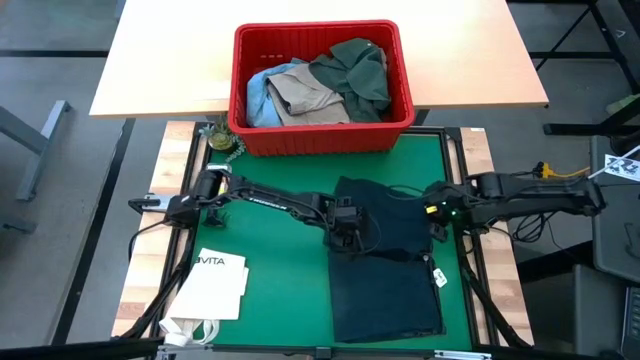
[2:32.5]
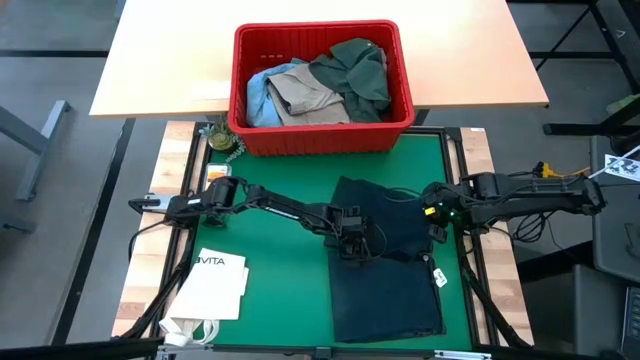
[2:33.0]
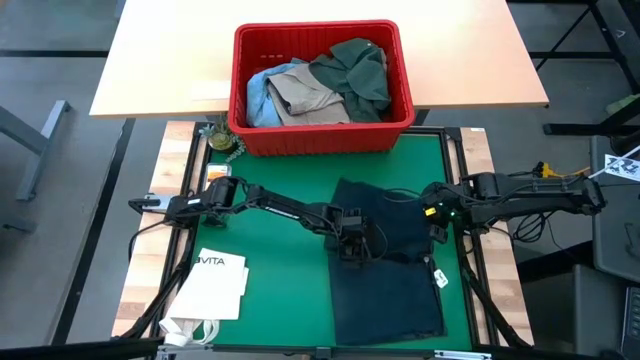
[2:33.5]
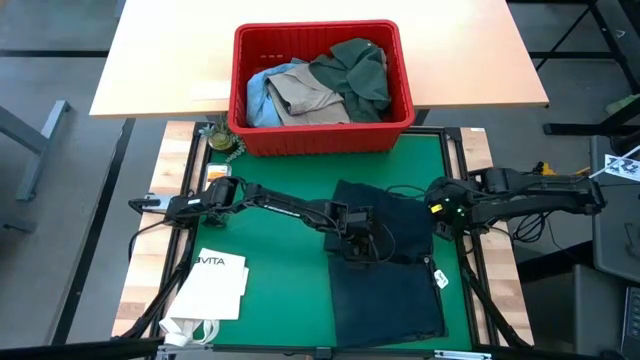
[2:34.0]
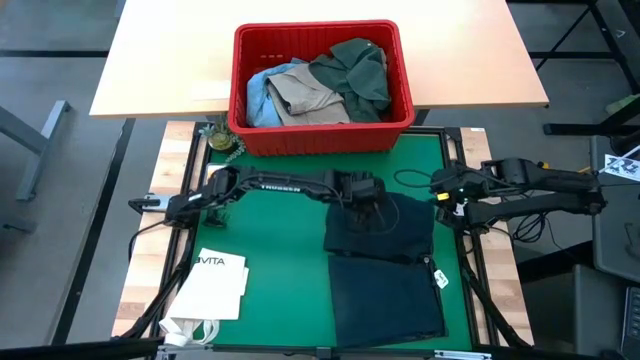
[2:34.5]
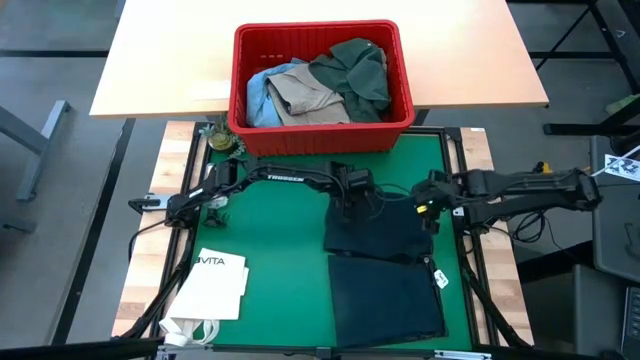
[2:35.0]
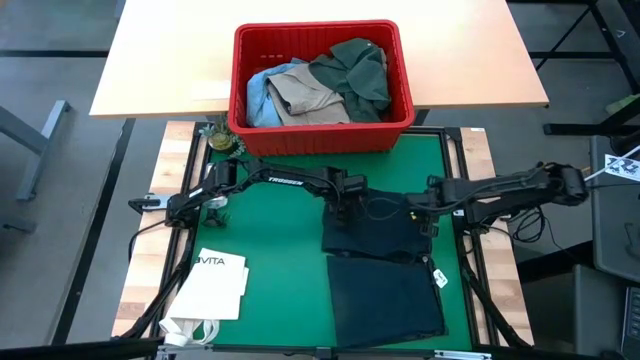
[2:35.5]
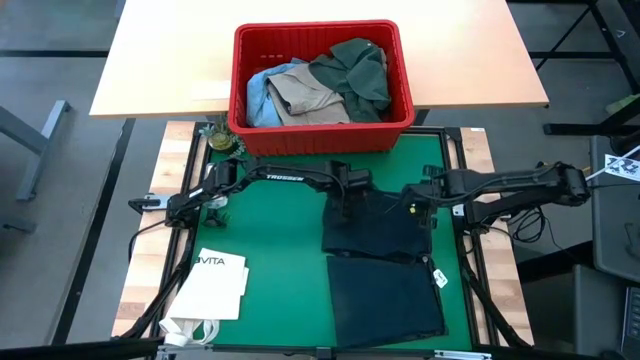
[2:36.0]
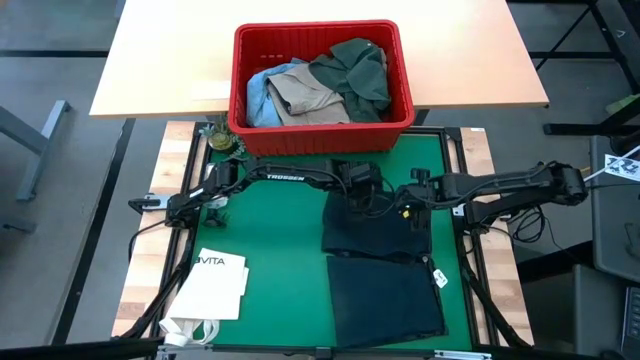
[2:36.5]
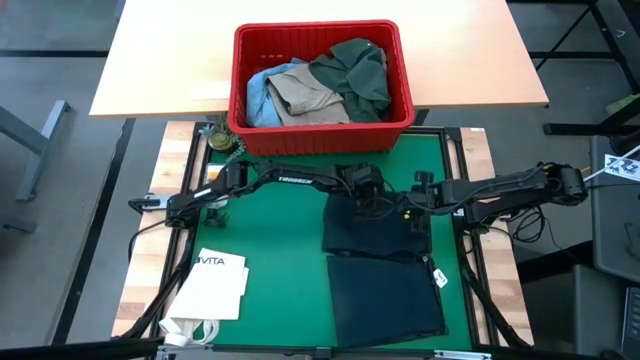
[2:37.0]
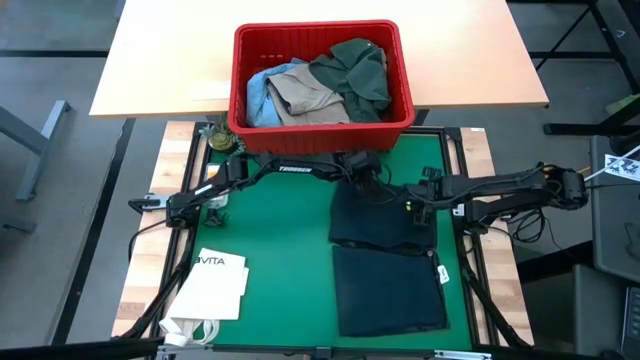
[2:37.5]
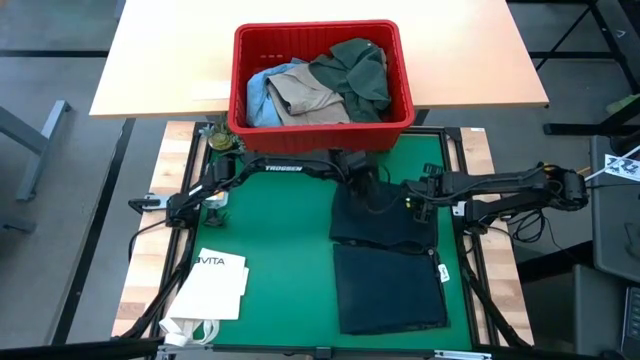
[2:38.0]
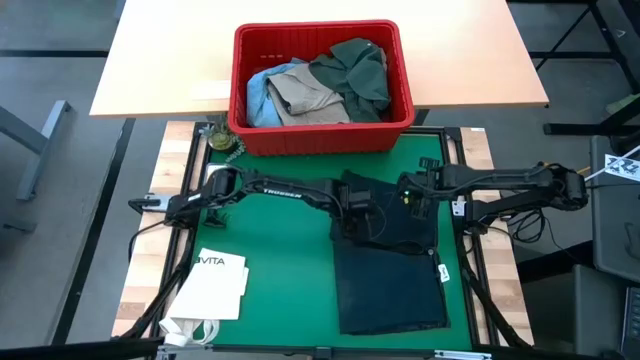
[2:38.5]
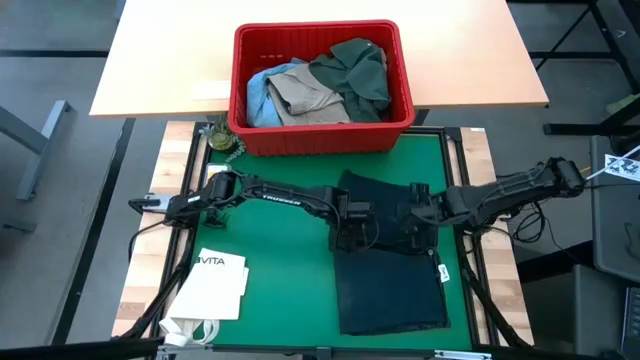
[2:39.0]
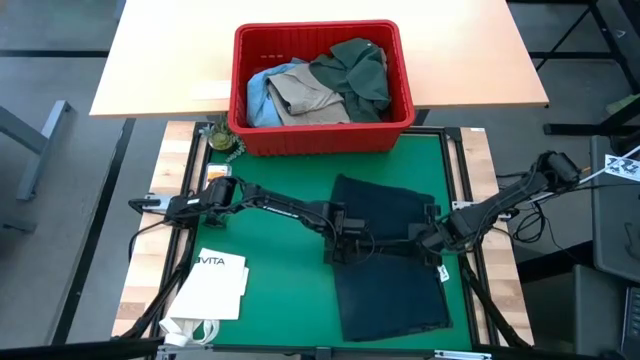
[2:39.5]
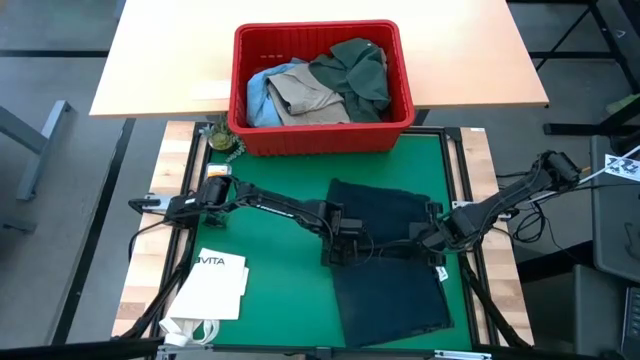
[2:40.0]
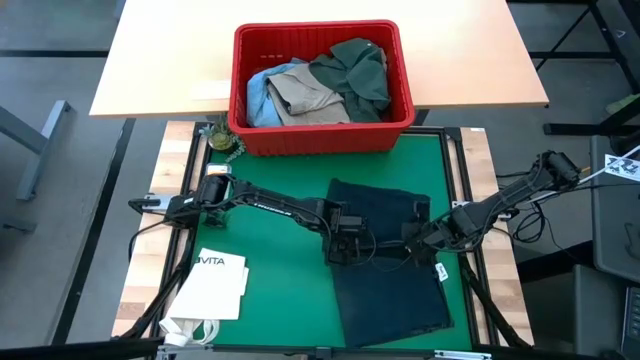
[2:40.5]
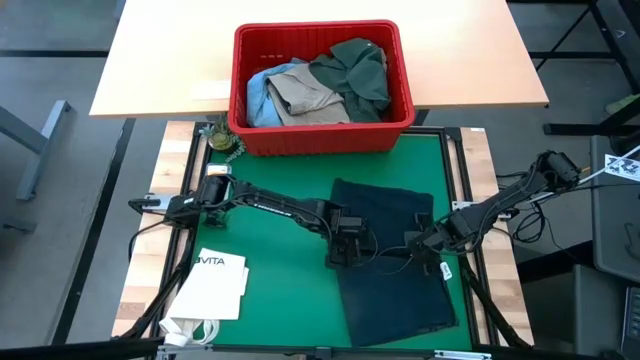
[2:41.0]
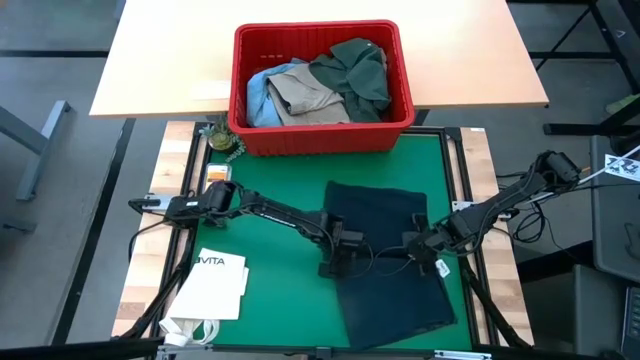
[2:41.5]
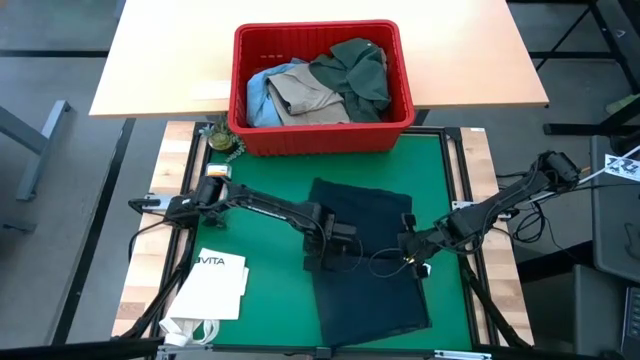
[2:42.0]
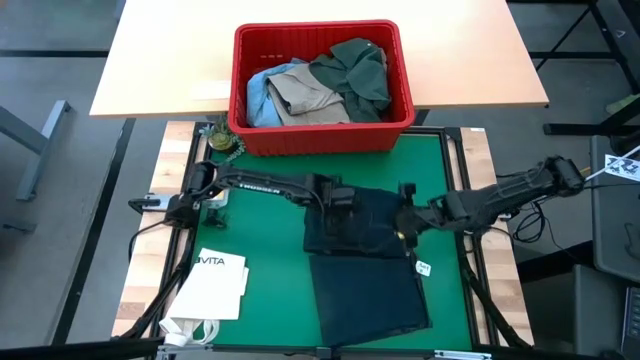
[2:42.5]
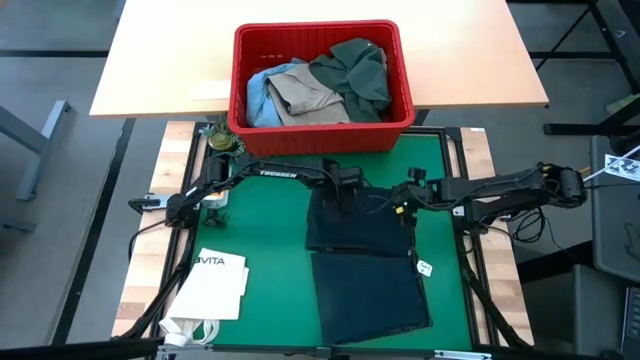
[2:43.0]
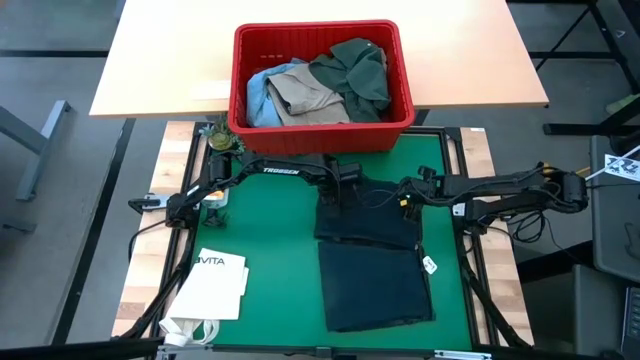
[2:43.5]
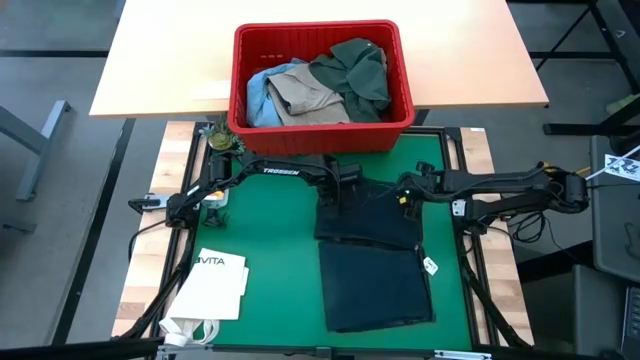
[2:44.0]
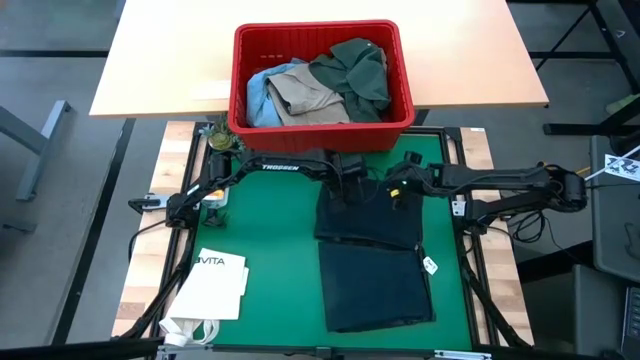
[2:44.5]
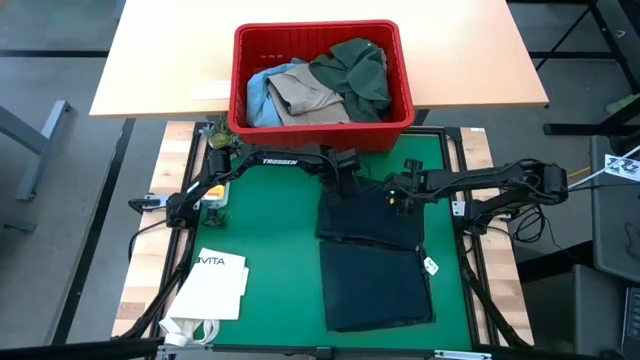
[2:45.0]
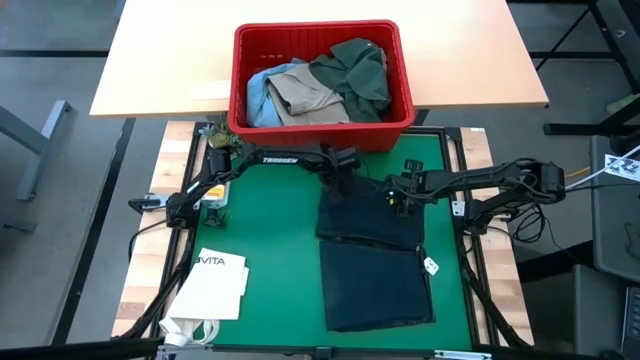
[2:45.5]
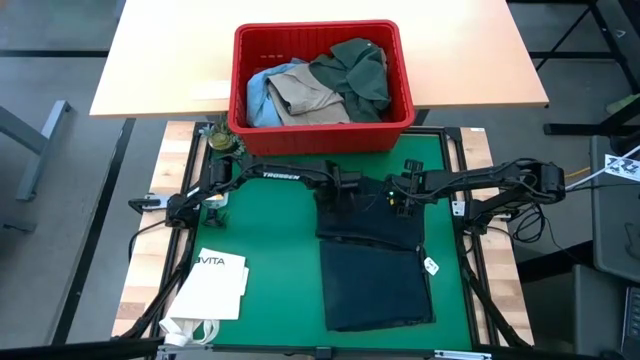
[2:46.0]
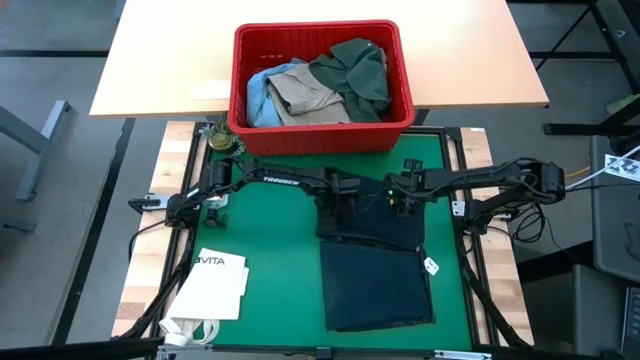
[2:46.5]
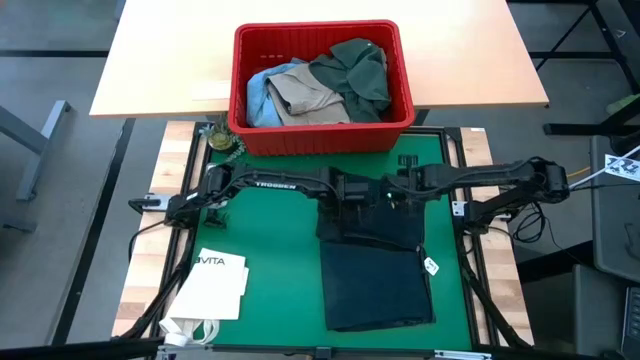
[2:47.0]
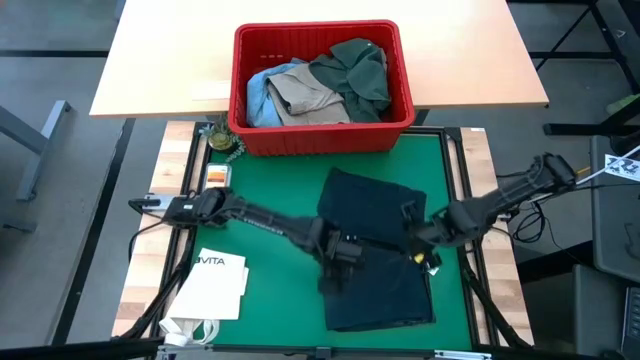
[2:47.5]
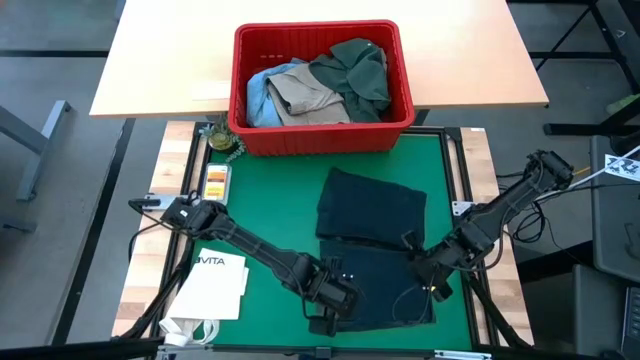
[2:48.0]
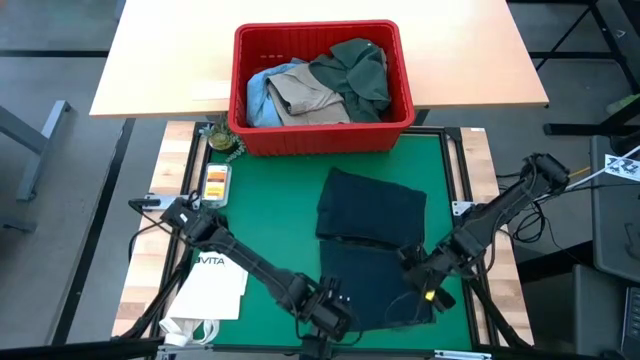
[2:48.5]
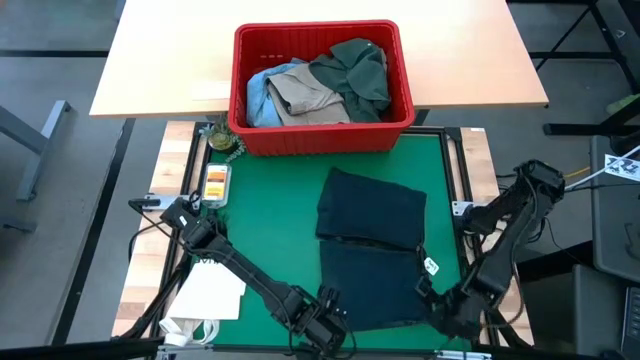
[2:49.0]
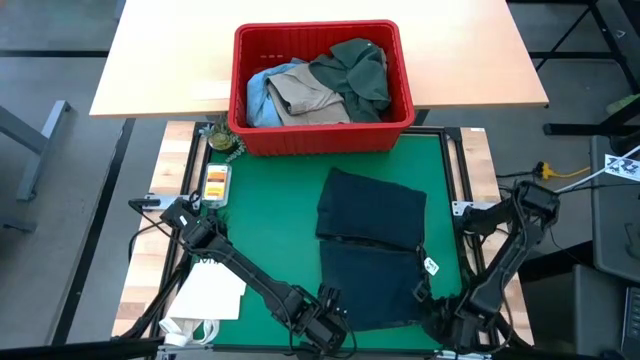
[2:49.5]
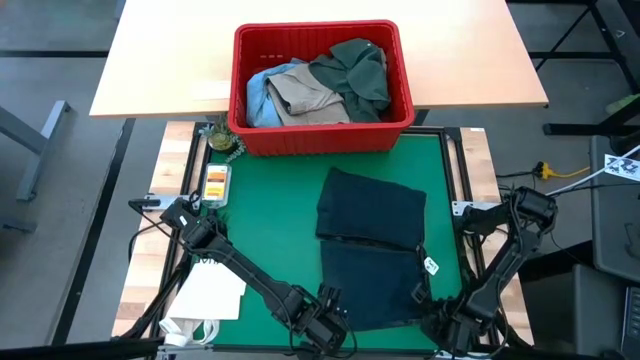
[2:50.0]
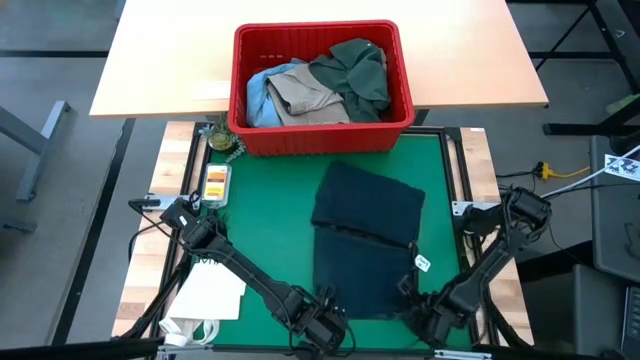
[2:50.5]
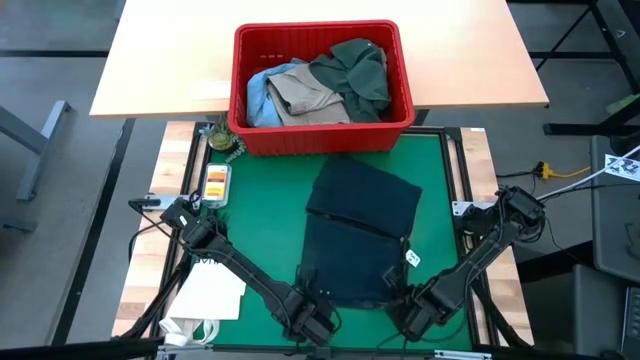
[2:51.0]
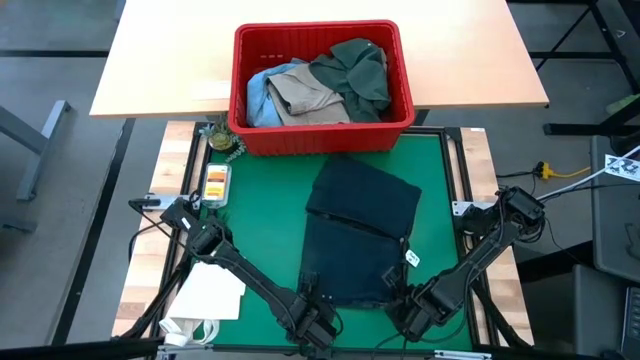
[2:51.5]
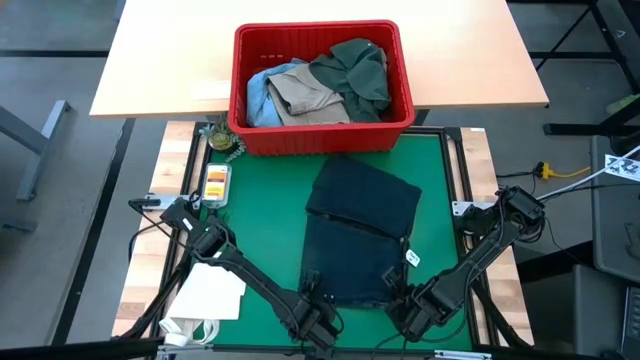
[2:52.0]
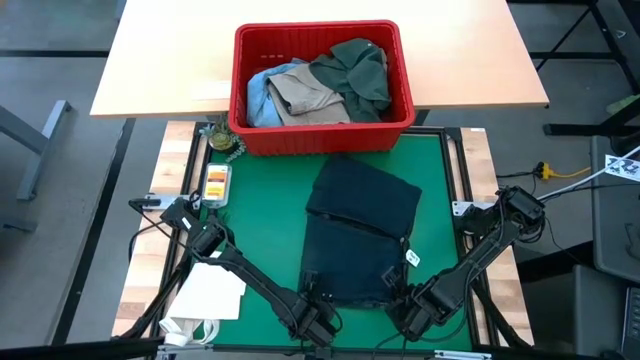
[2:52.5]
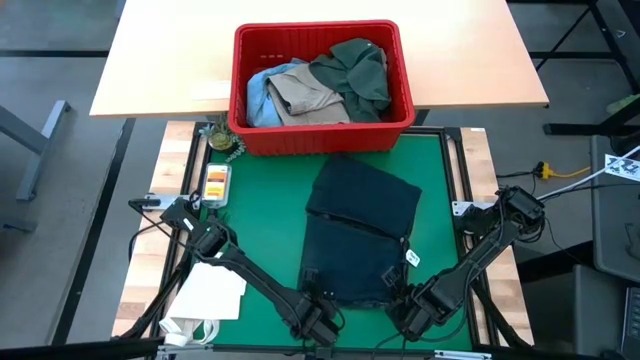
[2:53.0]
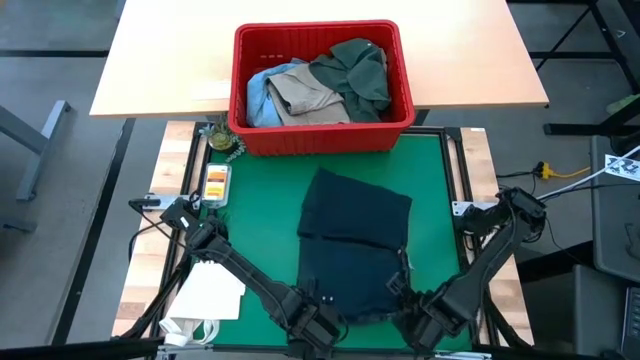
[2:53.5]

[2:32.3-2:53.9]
Task: Fold Laundry from Bin
Fold the dark blue pants
